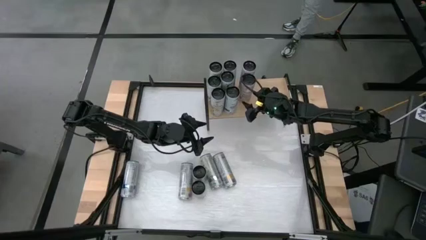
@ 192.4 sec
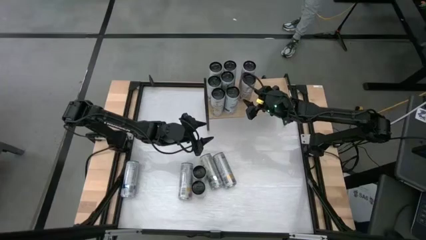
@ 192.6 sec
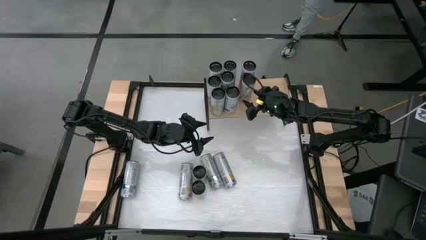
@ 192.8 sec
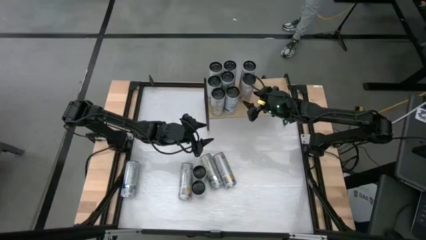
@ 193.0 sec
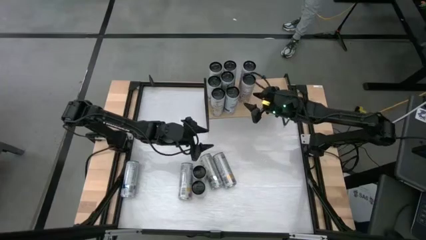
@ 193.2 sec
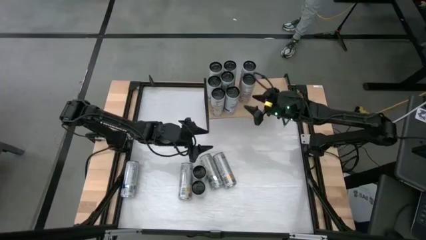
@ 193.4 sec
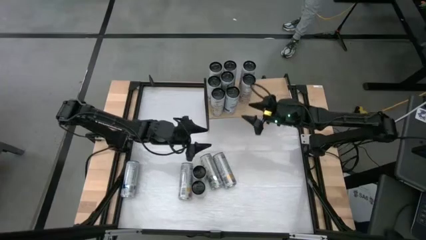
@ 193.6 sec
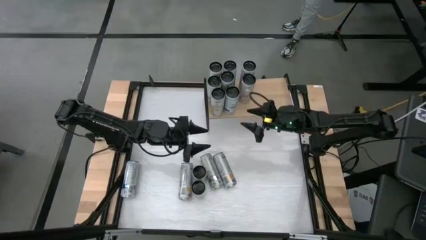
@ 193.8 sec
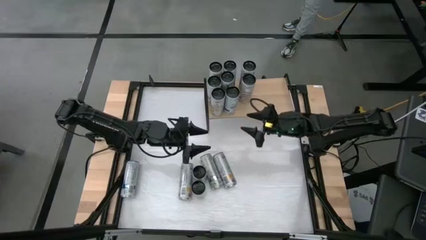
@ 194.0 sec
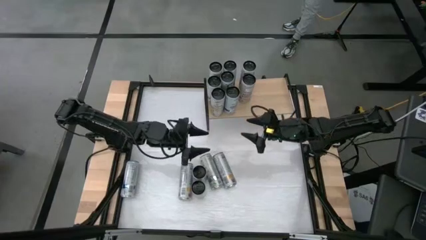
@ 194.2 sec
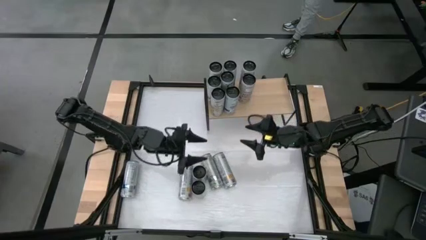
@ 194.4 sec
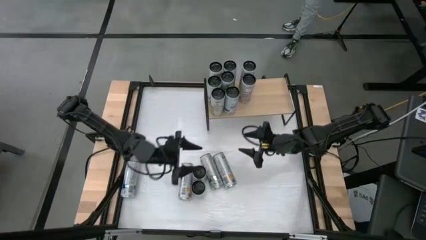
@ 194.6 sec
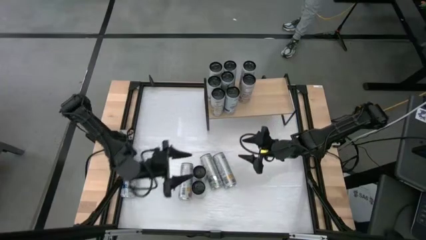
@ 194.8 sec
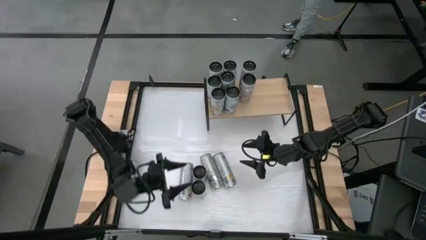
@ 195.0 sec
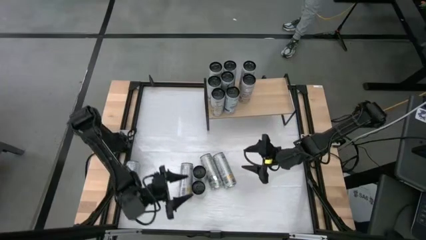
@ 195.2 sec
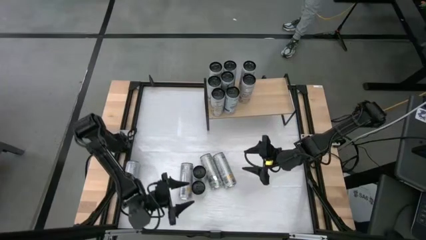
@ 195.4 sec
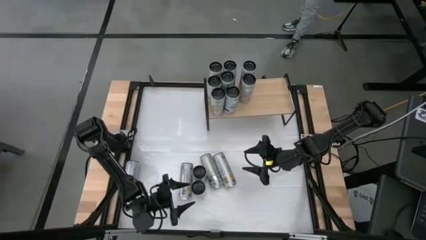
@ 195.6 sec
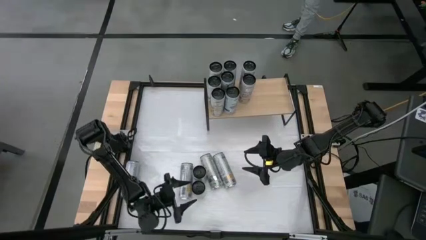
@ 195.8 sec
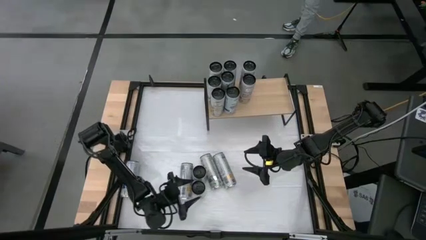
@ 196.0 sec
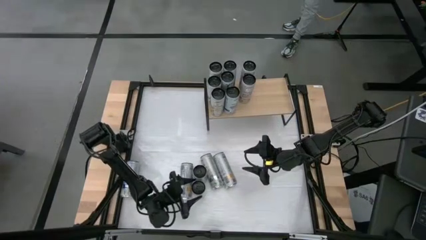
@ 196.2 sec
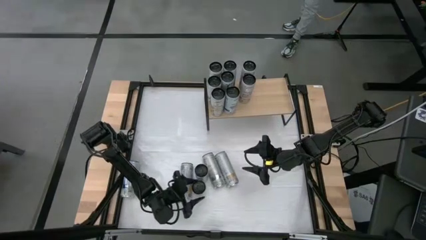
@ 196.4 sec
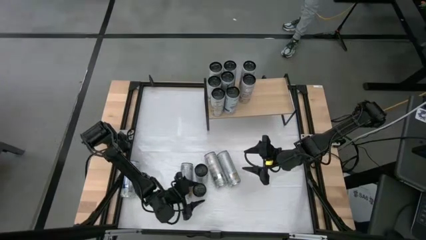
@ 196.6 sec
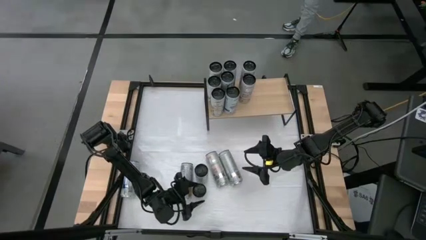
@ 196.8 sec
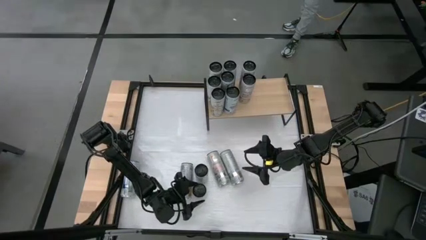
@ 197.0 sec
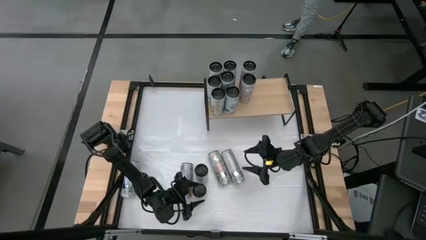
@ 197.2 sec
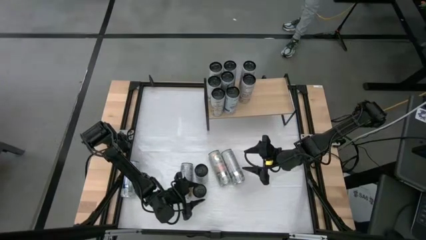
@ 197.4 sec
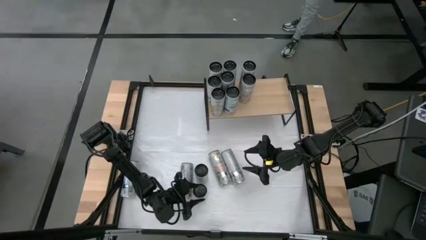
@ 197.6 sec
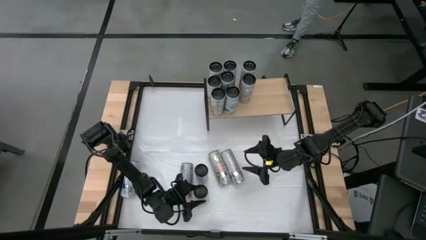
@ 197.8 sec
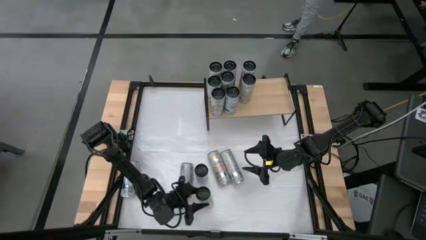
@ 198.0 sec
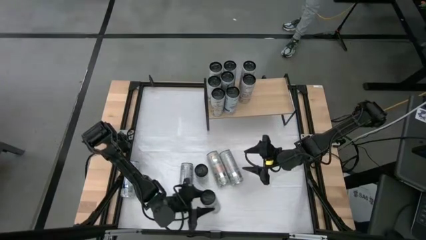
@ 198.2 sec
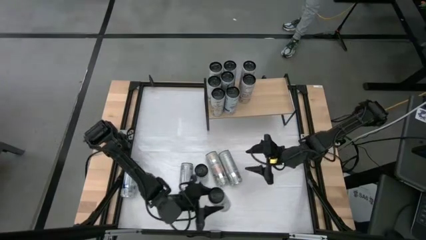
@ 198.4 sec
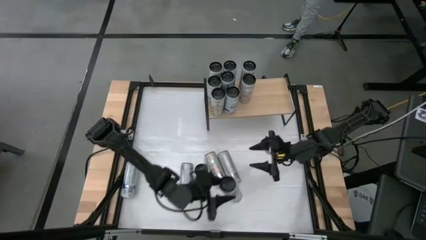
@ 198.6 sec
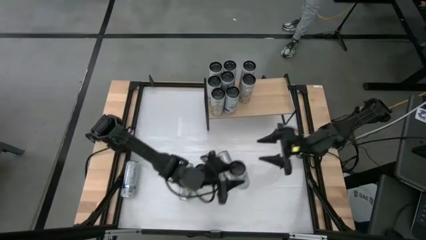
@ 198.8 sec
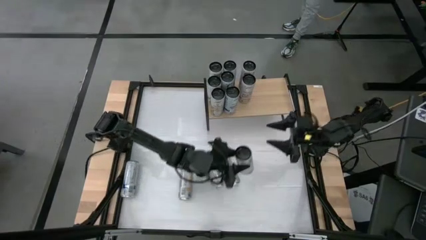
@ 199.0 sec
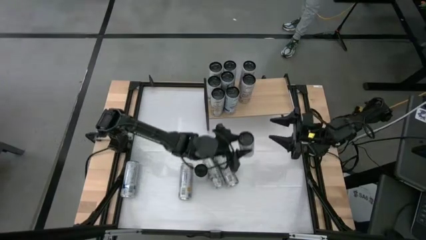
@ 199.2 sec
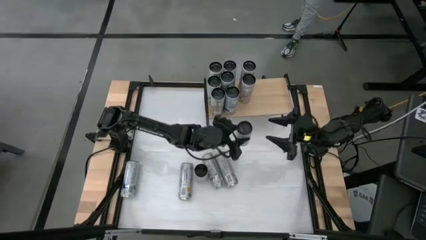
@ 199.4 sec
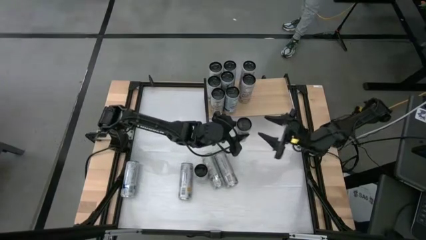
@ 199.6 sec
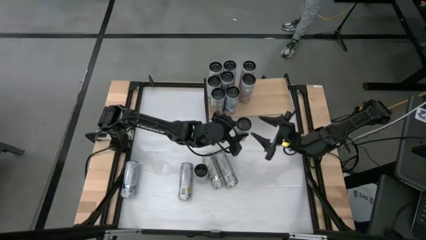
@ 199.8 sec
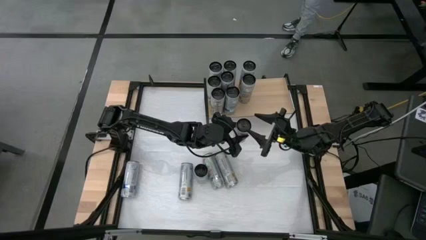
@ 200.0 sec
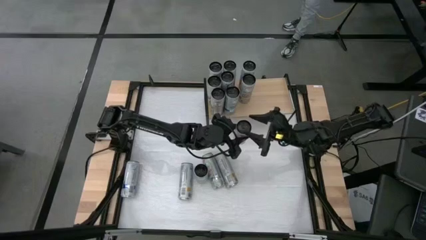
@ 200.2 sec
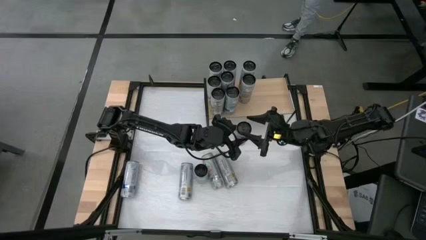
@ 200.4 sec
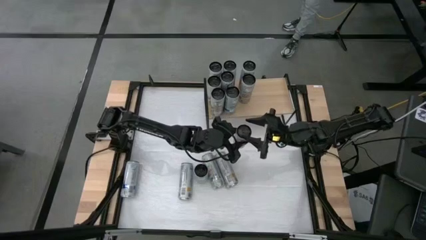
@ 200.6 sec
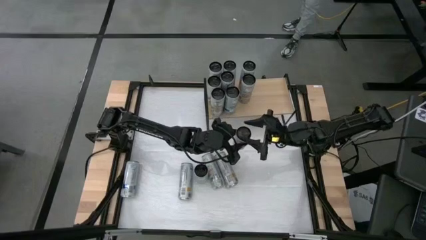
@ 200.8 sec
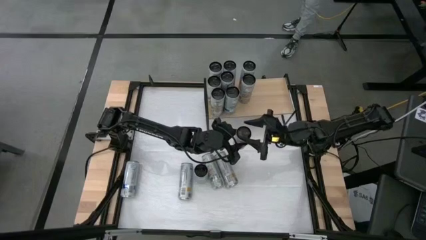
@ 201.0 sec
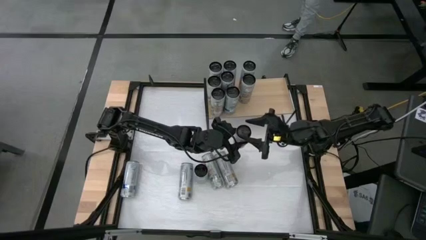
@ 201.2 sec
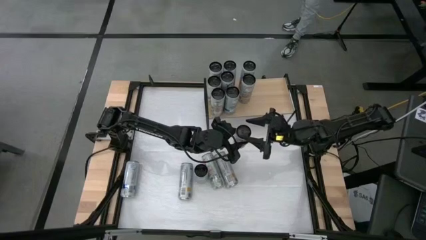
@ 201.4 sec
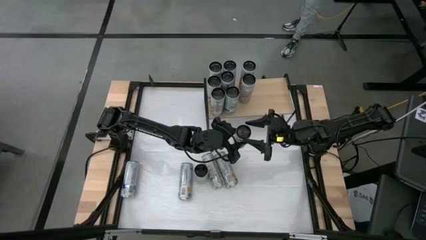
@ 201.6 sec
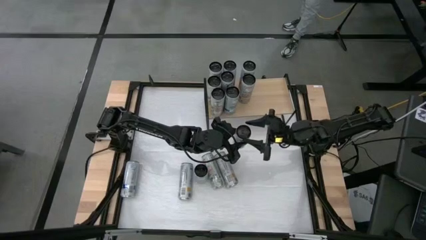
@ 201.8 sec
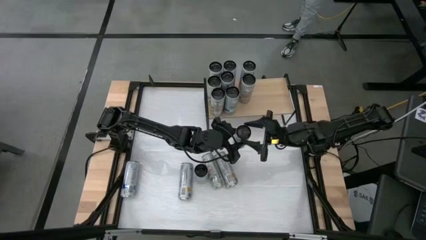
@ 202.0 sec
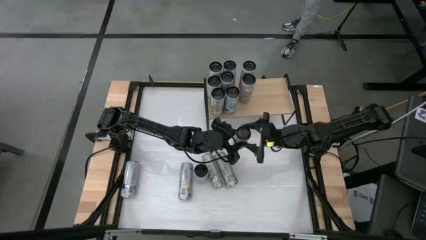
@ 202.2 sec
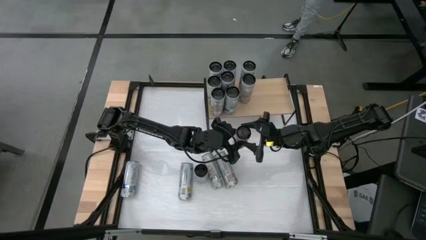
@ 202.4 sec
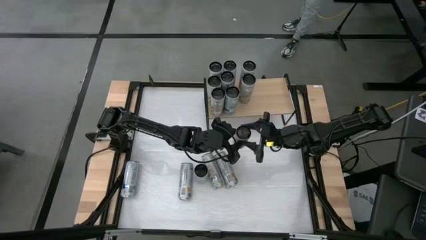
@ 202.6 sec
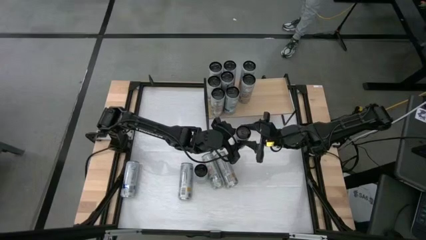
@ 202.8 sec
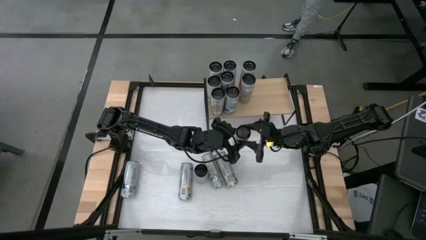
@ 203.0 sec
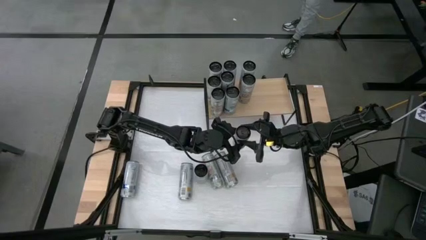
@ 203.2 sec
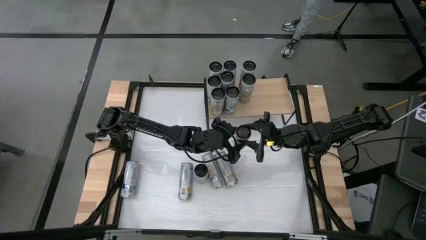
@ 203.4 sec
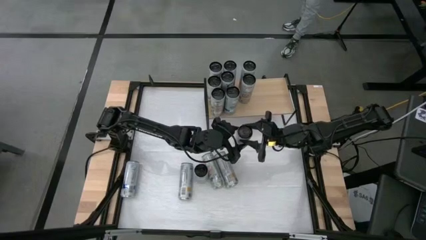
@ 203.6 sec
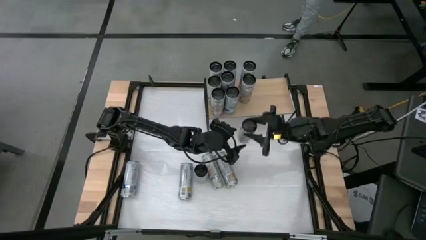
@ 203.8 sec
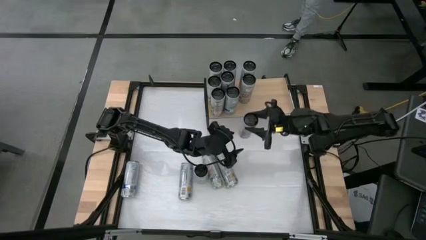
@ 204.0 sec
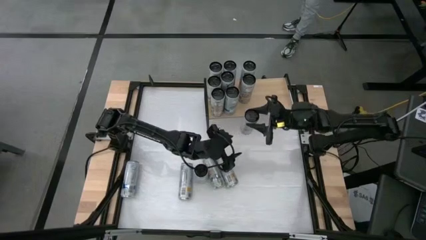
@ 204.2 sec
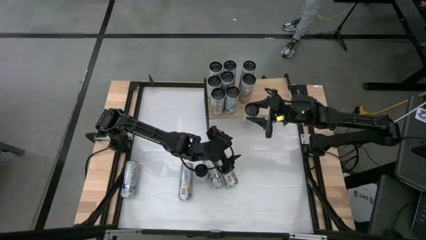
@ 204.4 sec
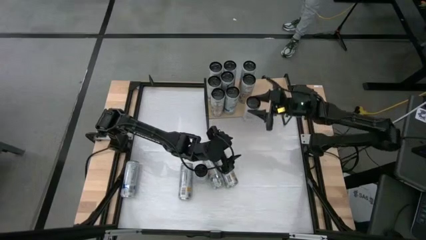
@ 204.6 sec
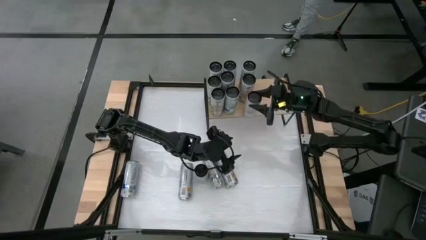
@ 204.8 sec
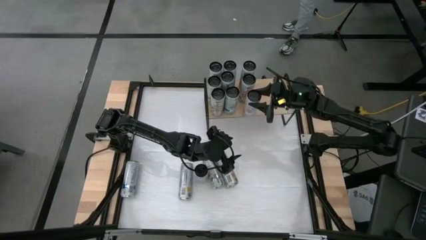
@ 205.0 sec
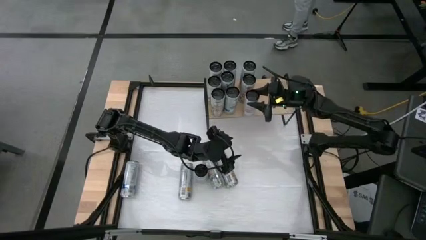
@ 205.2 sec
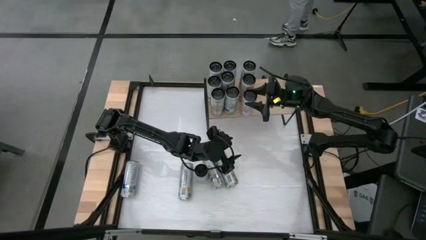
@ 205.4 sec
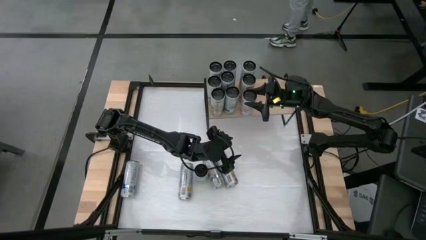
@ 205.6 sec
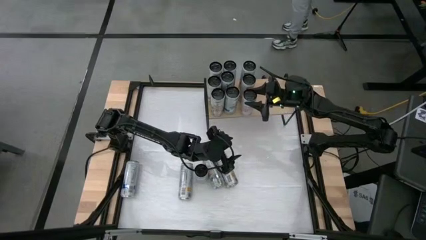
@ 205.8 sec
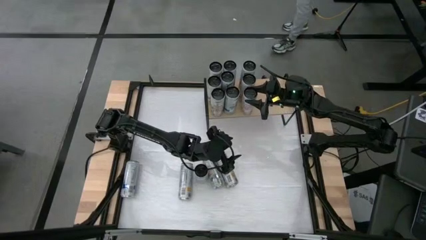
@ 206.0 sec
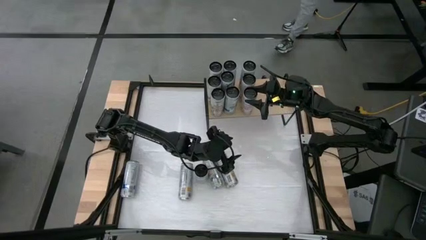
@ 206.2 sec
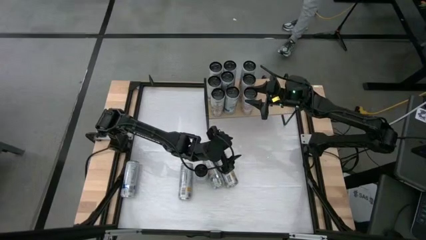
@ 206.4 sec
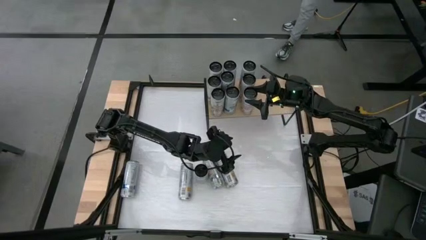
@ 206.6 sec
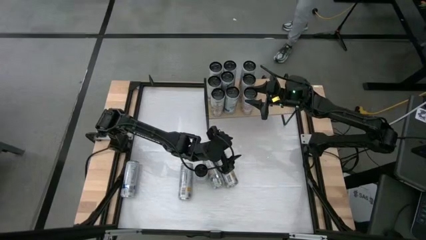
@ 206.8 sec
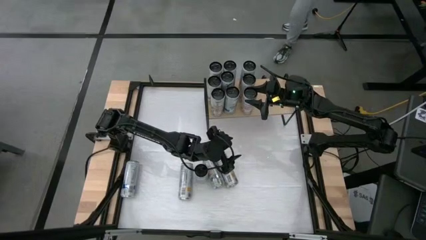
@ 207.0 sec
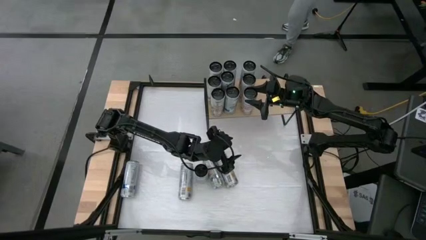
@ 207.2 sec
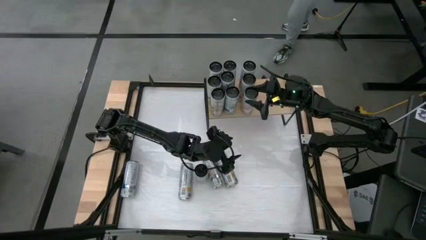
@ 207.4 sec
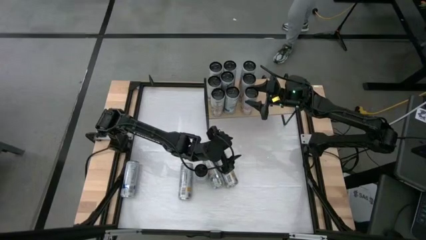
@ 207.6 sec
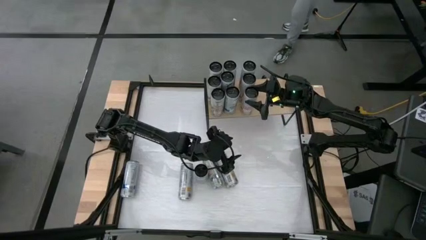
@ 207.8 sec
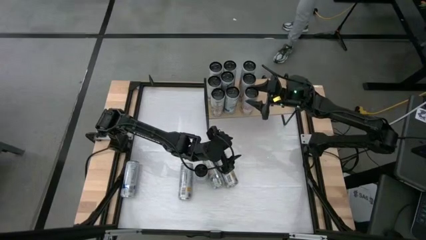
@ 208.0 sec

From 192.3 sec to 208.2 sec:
Task: Place canned beverage on shelf
Put the pink soda can on the shelf aligned with the other pink soda cans
